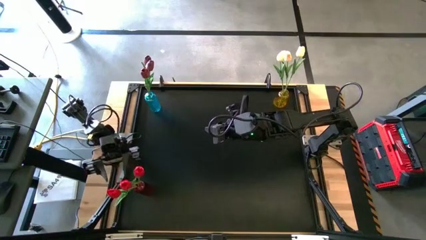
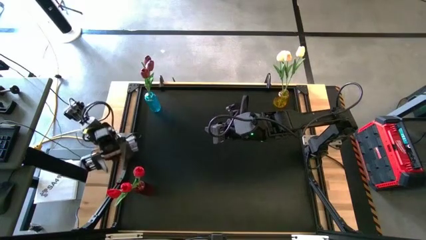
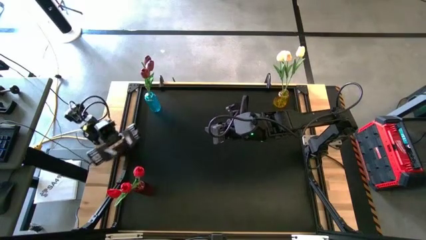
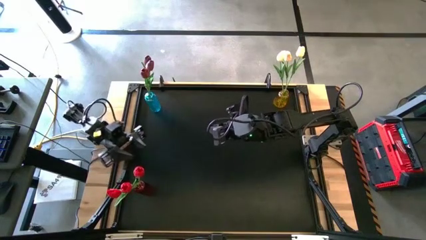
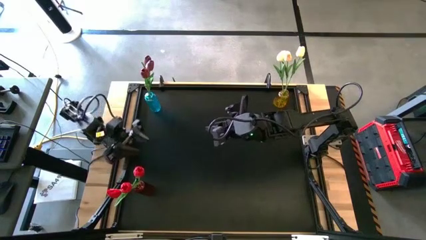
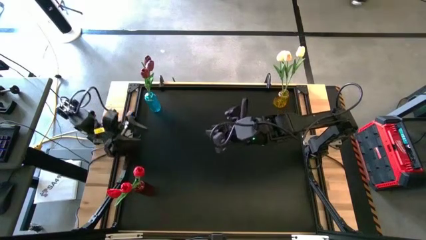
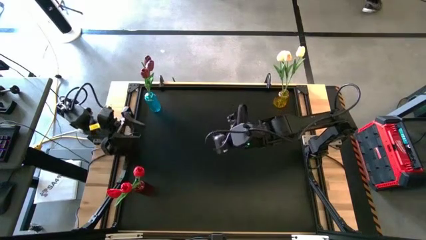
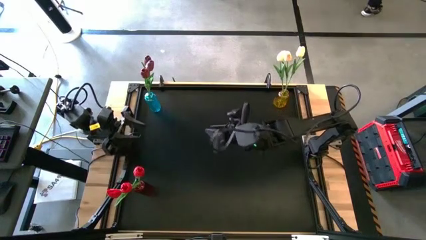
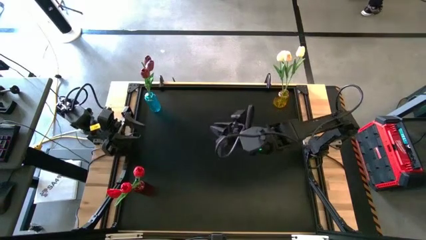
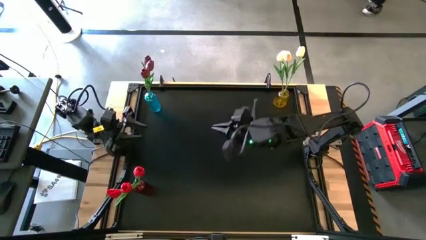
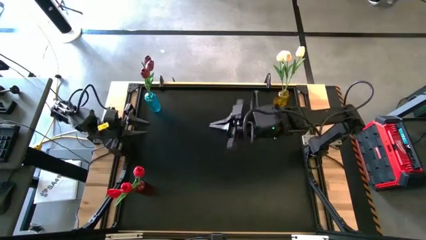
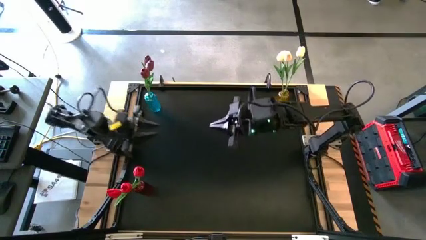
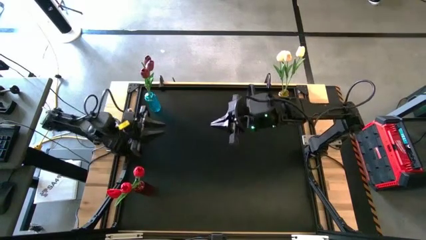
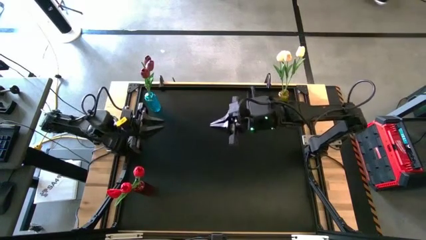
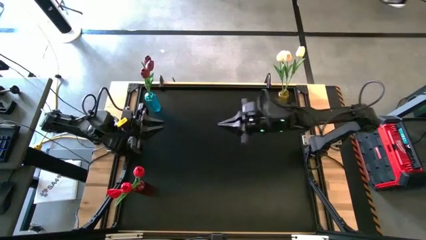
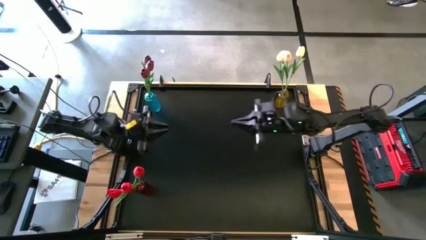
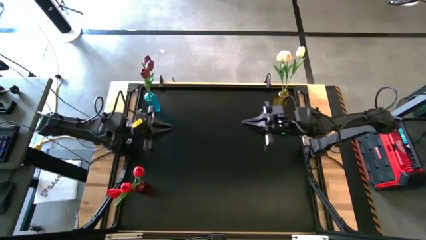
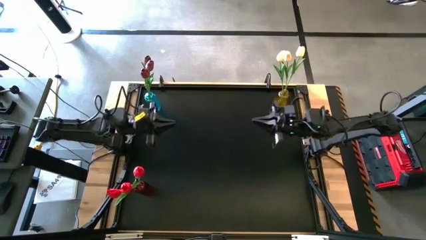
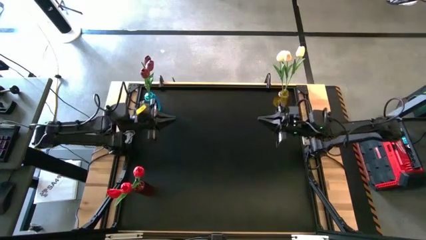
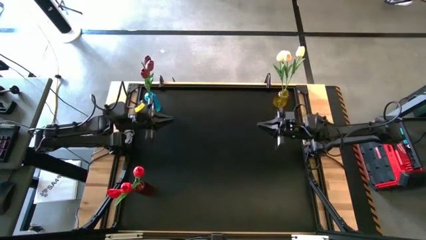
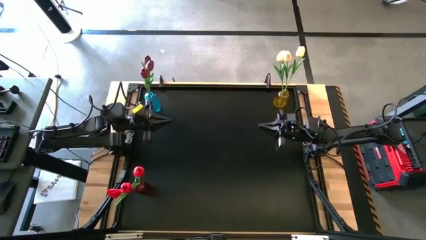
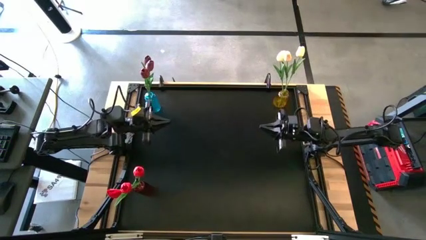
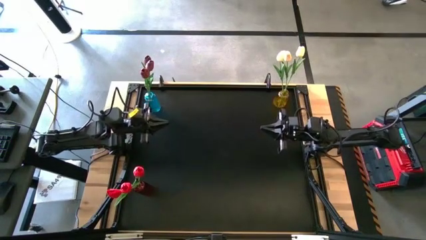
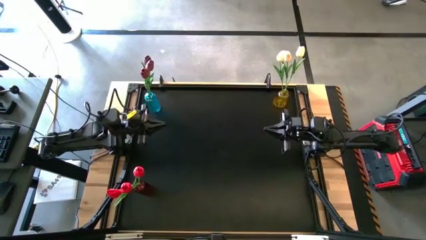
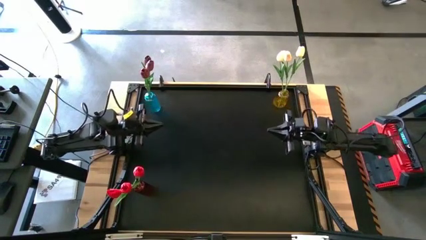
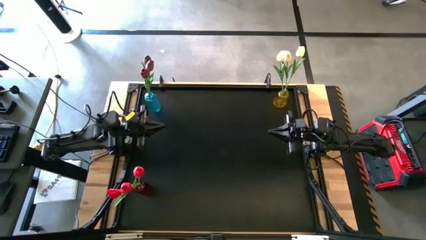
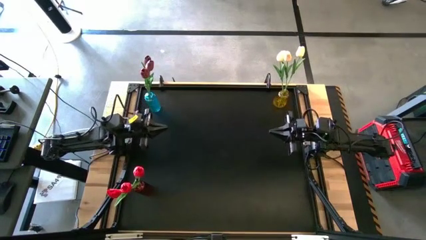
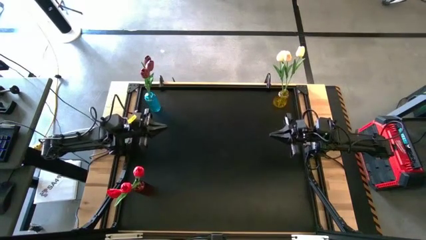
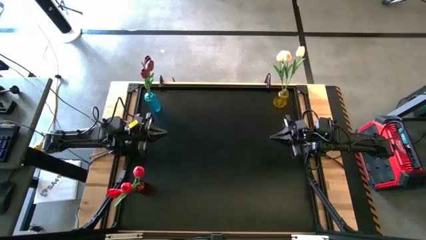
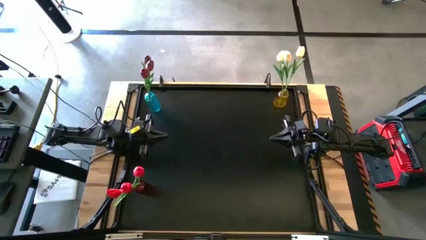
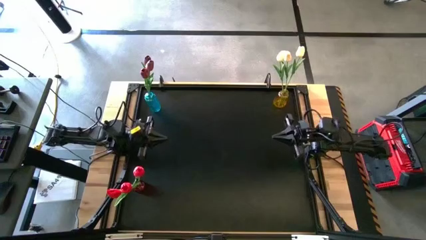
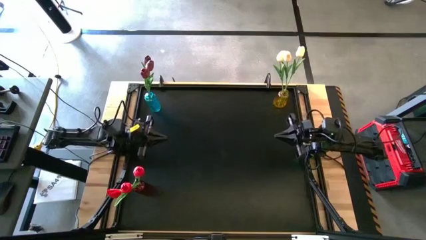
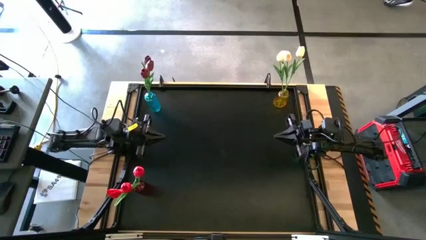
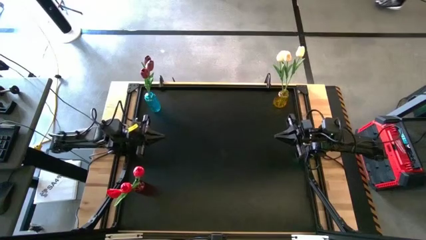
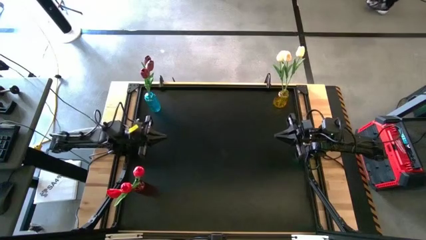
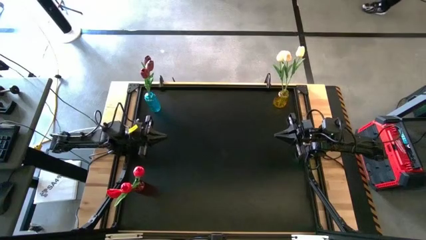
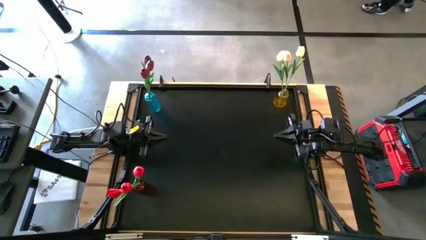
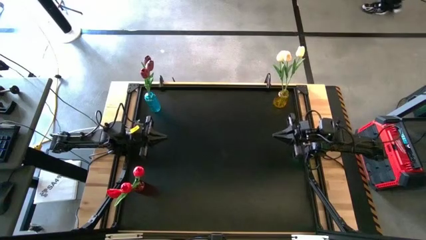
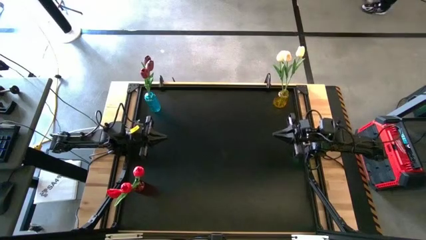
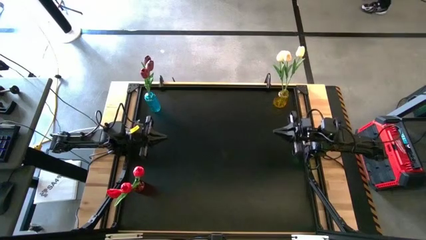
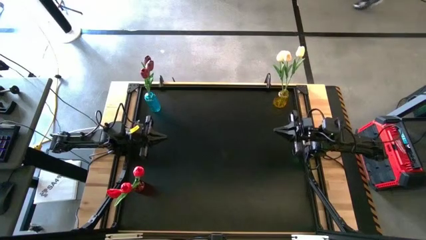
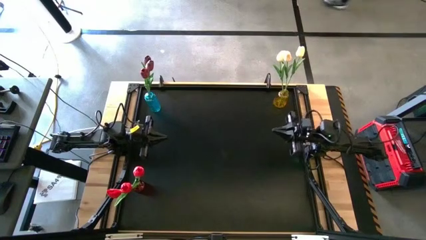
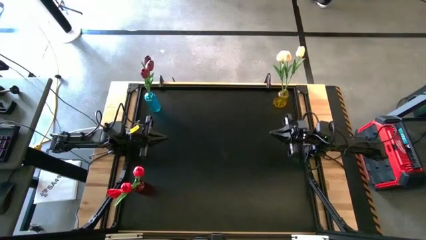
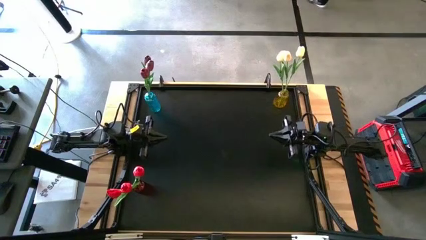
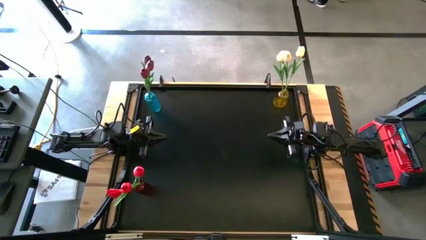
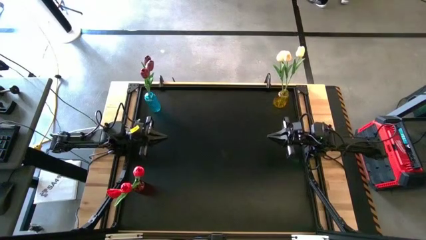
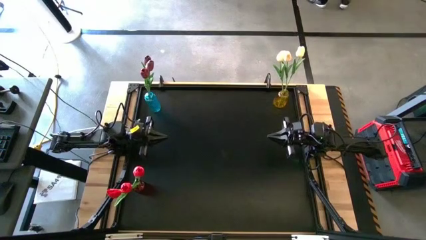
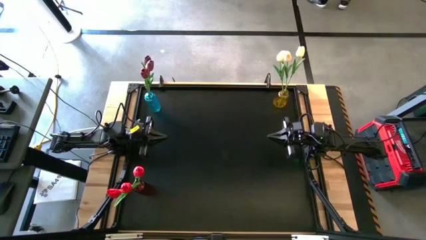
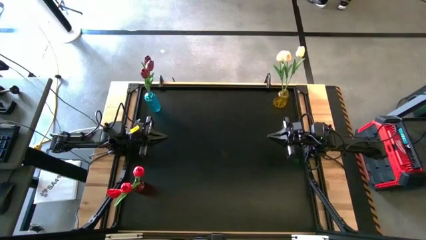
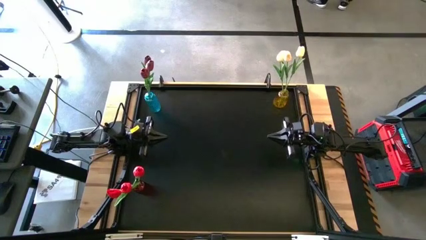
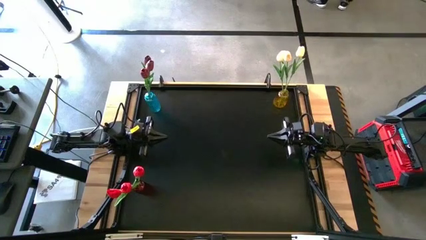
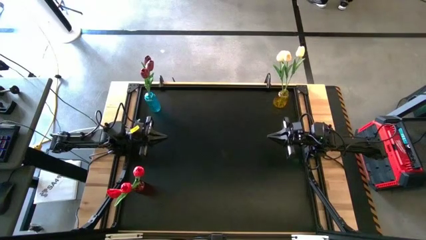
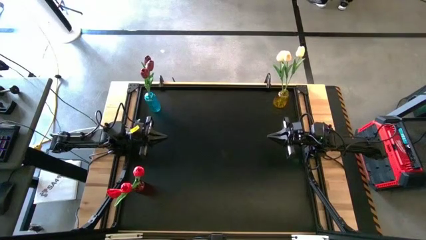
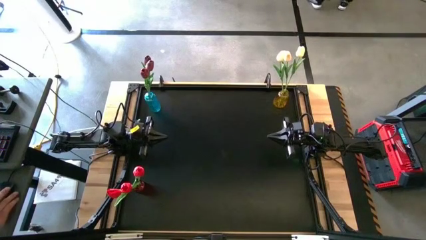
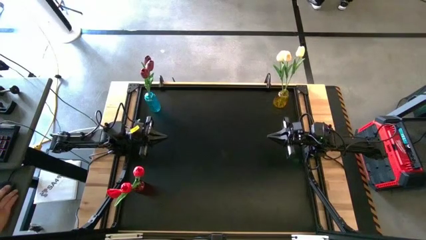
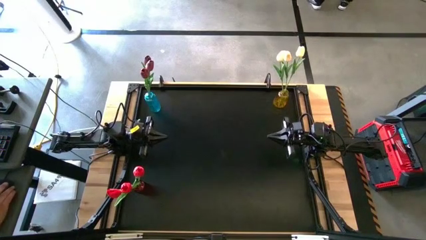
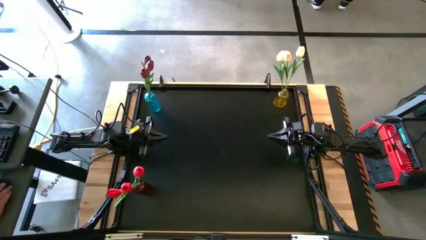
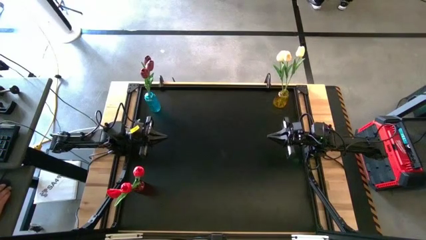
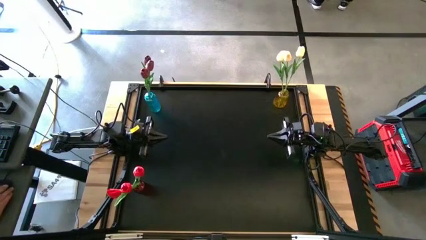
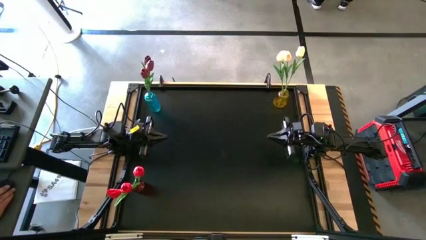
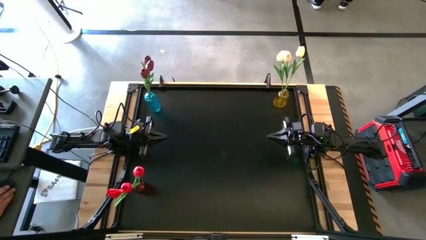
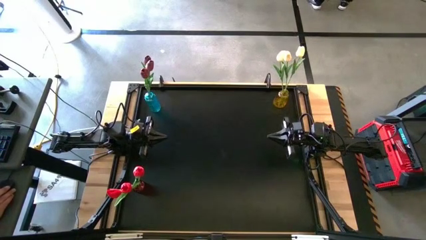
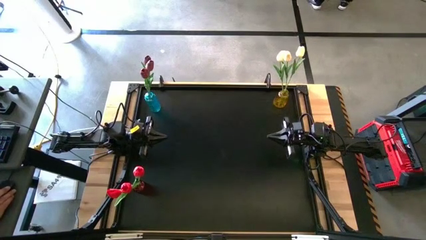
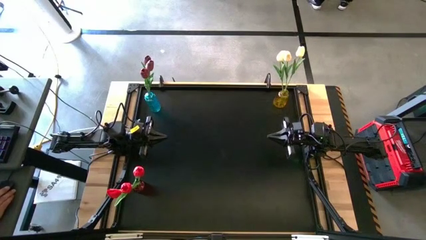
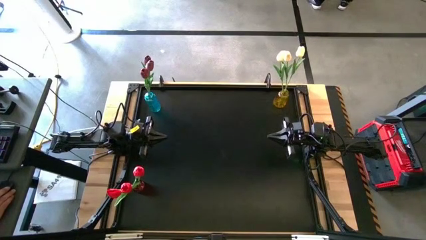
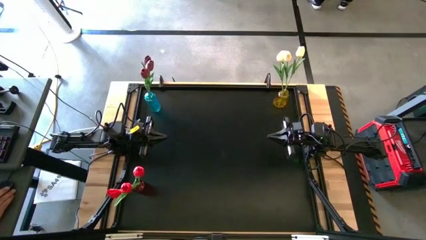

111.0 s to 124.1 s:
Task: Sort flowers into vase by color
Return to Home Position

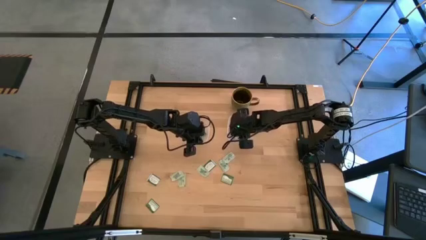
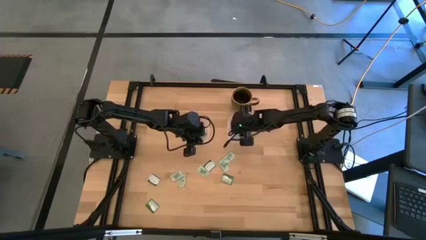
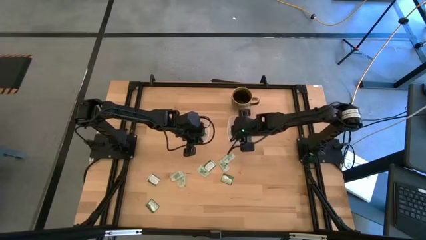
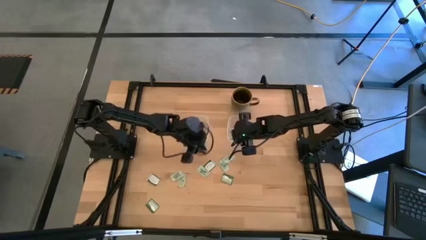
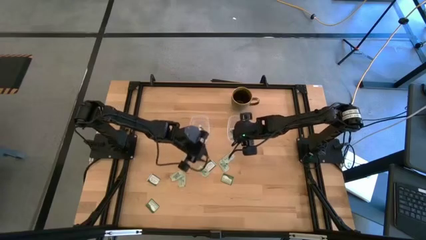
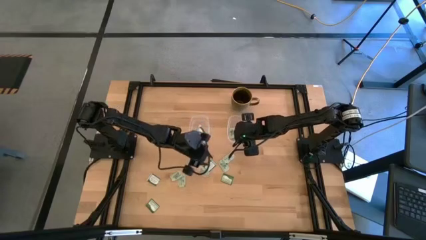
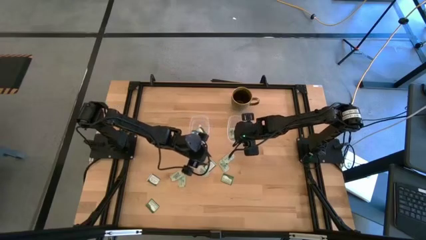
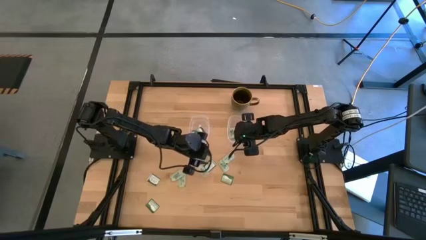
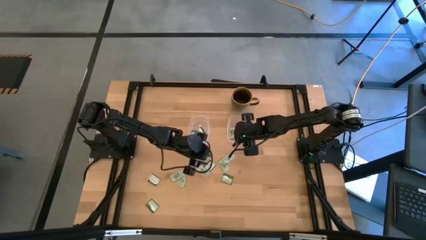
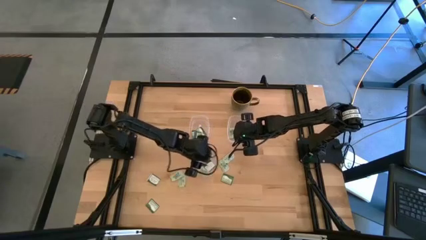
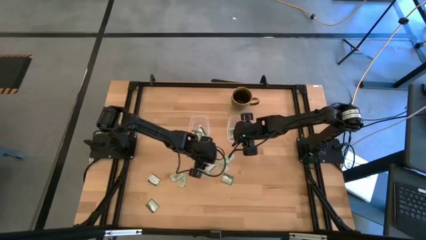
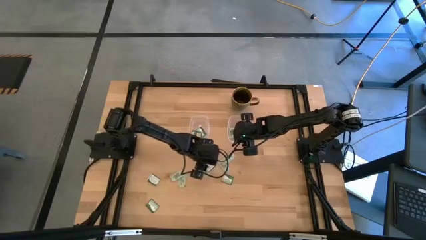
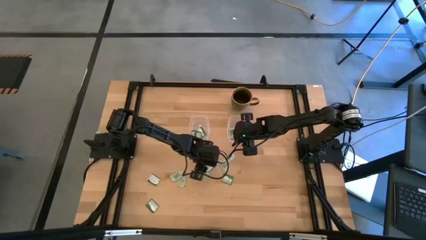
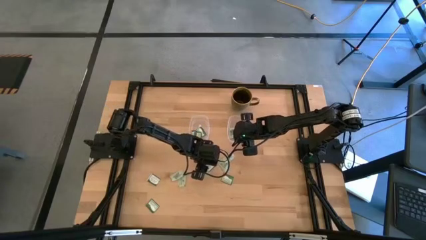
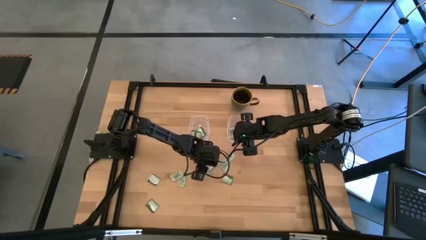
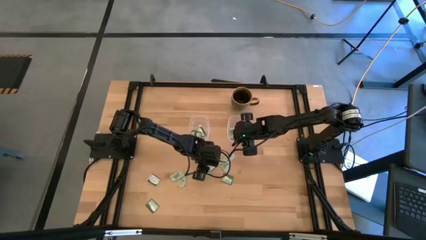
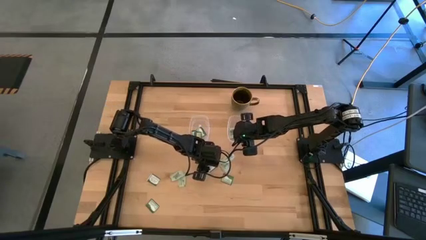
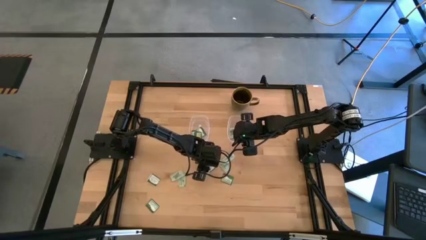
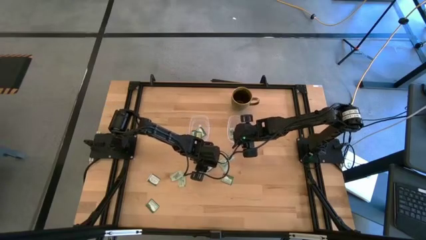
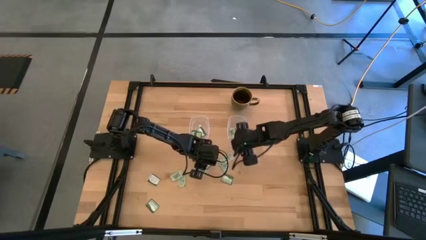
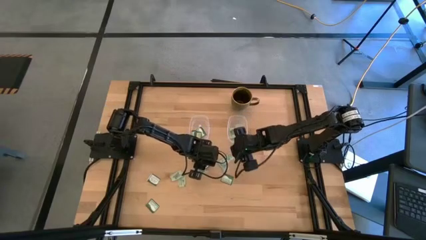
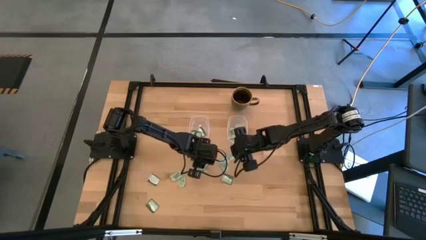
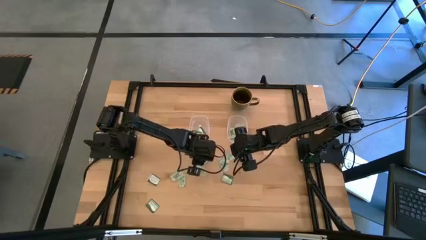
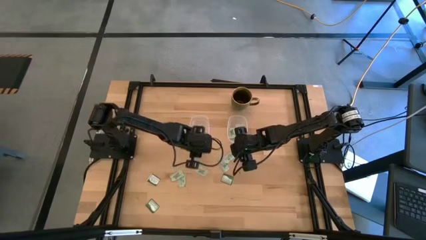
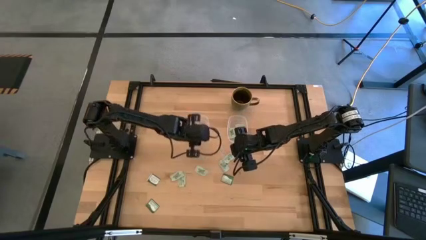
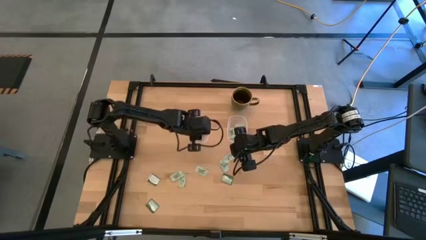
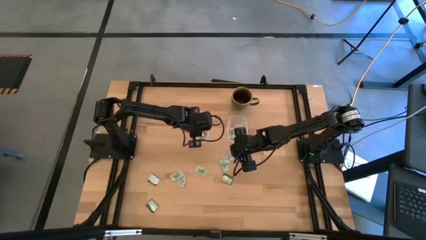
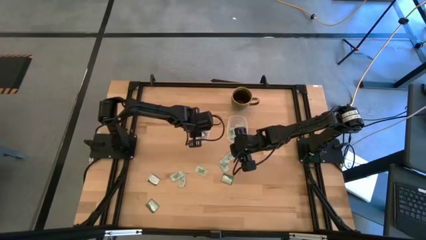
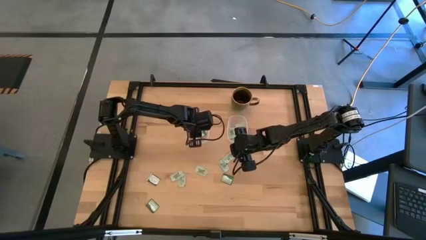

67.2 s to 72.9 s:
Task: Pick and place items into bin
Put the truvia packet into the left transparent bin
